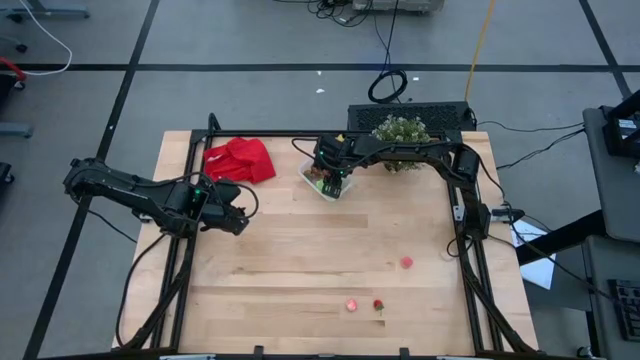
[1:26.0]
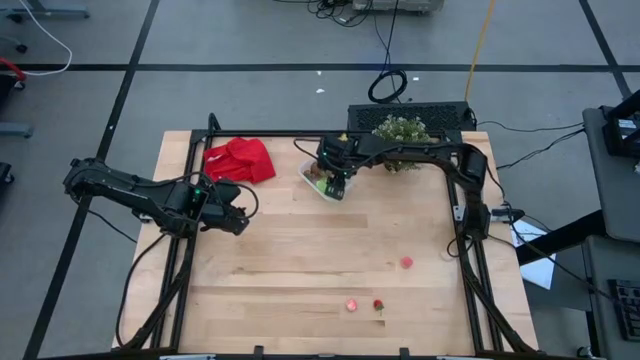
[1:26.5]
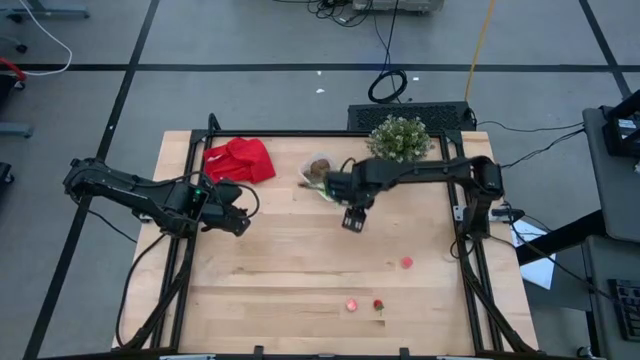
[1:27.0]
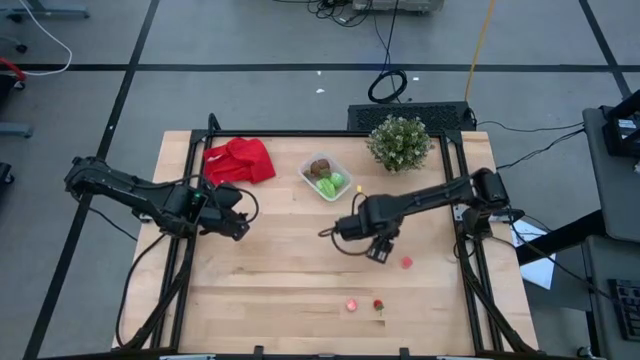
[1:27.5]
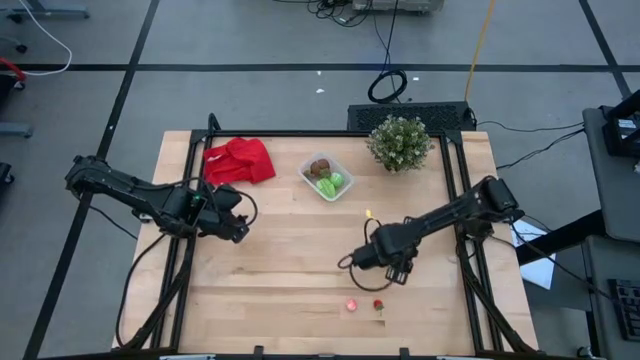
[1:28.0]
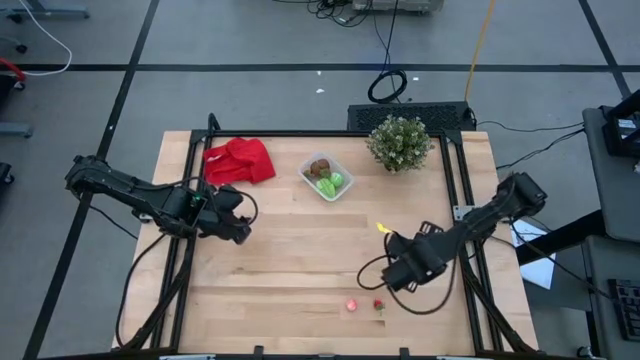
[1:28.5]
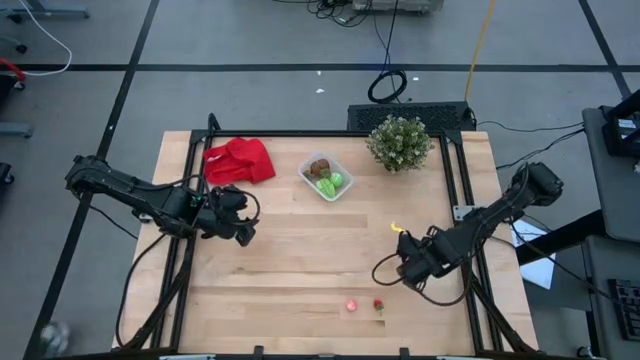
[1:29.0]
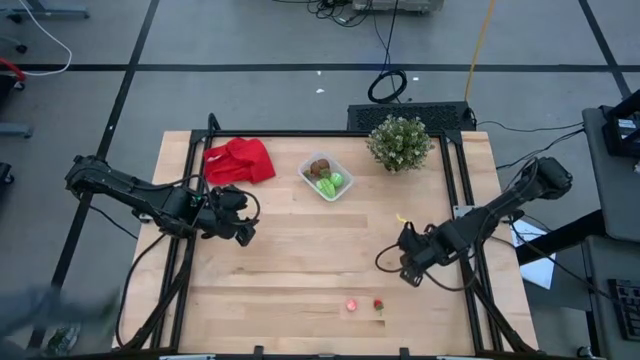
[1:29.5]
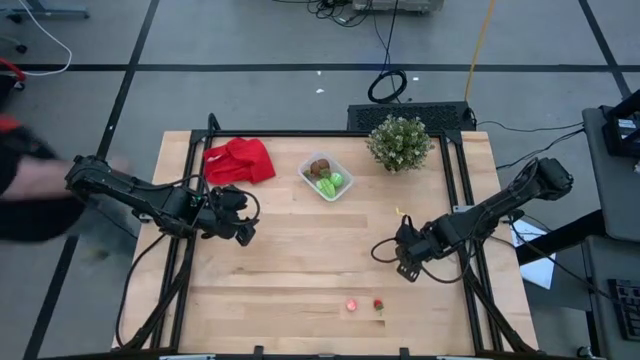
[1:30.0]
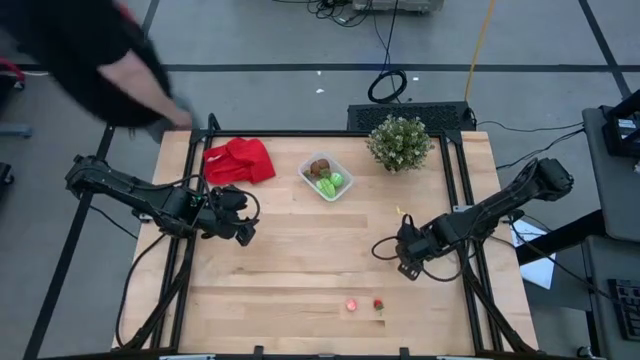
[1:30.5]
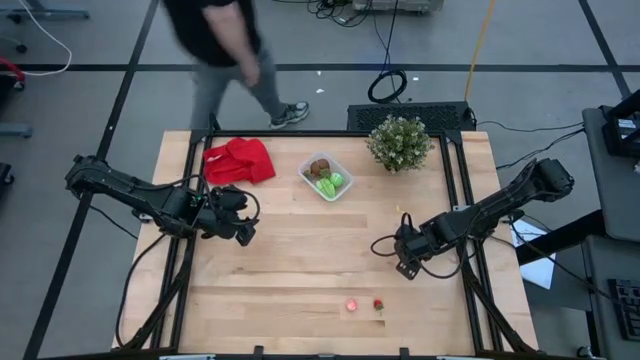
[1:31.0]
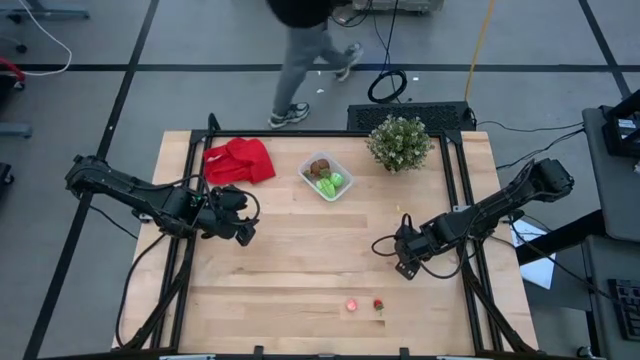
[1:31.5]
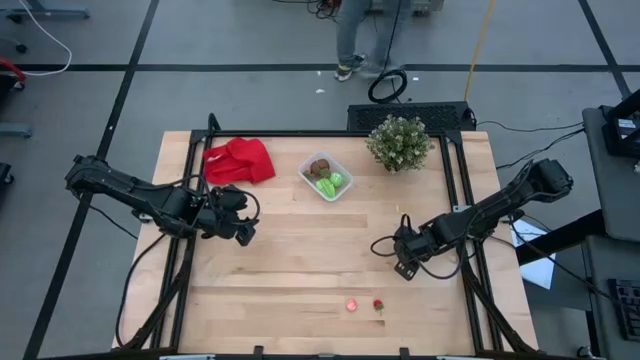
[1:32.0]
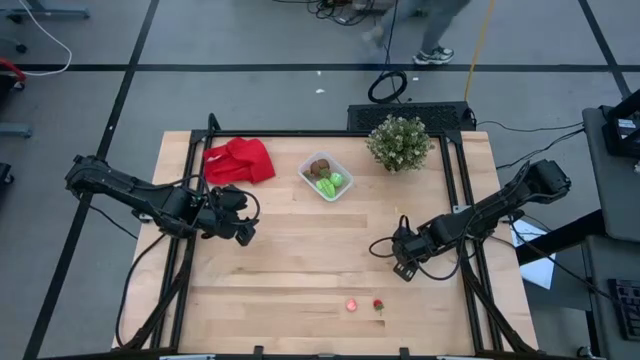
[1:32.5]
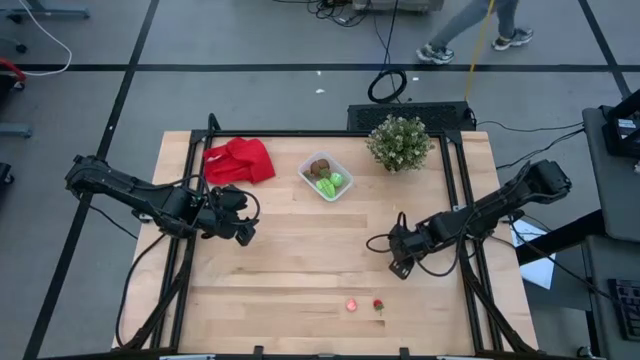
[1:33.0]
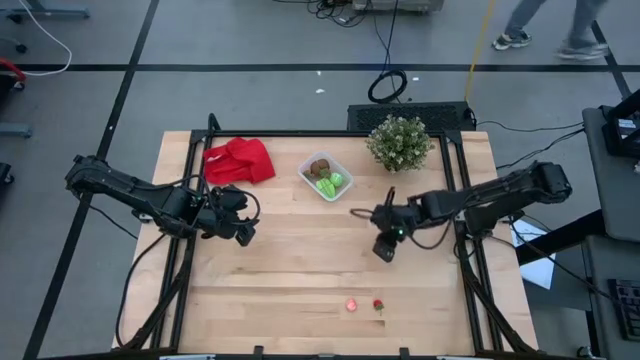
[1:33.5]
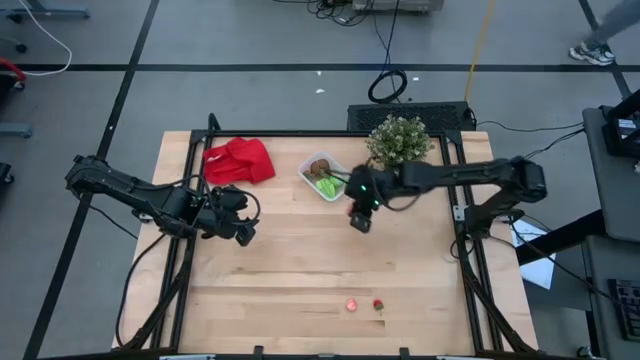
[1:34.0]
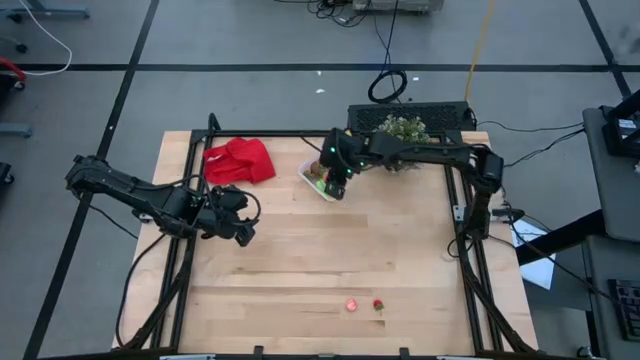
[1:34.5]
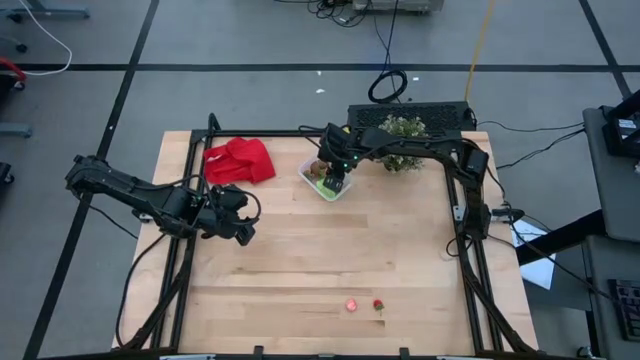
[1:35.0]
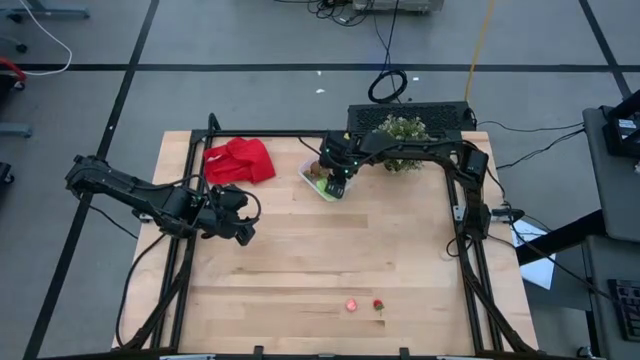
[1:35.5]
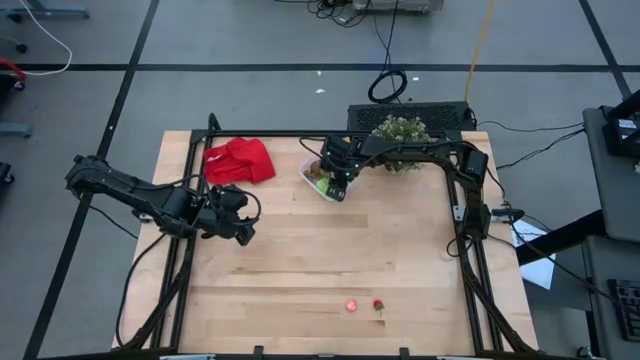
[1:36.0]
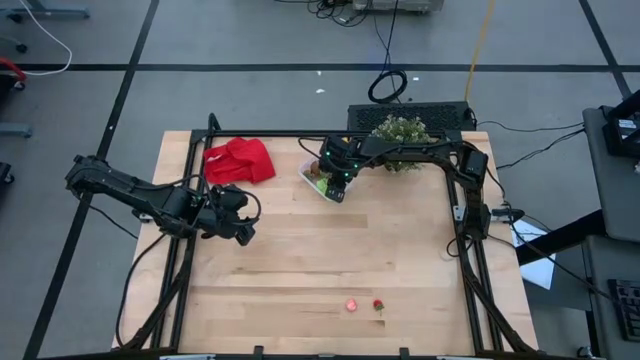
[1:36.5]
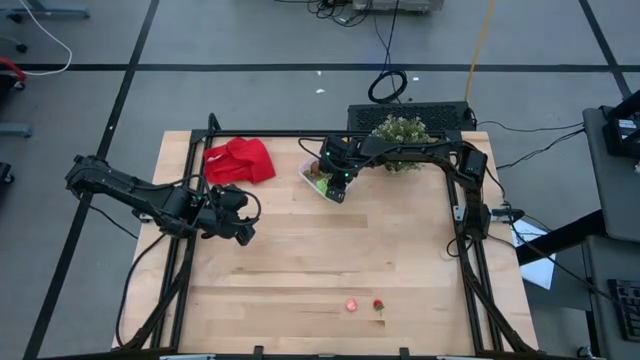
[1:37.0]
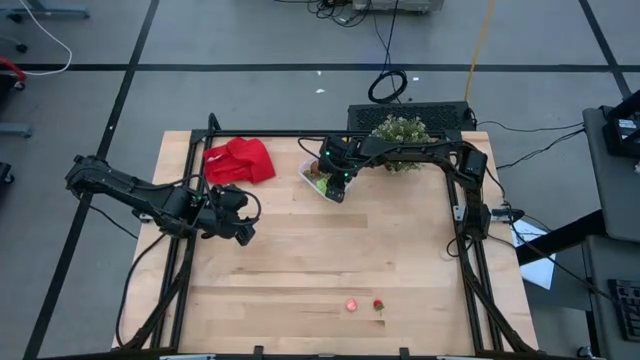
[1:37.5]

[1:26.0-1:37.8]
Task: Pick and placing Produce into tupperware
Put the top pink peach into the transparent bin

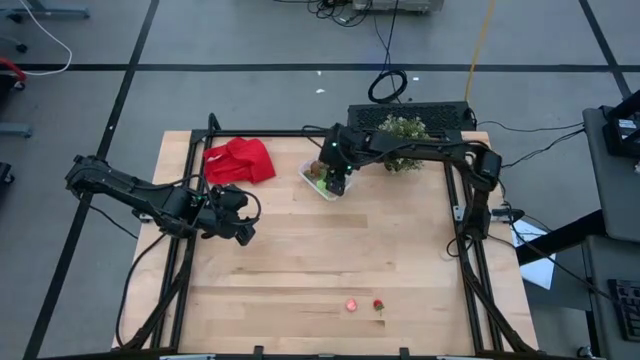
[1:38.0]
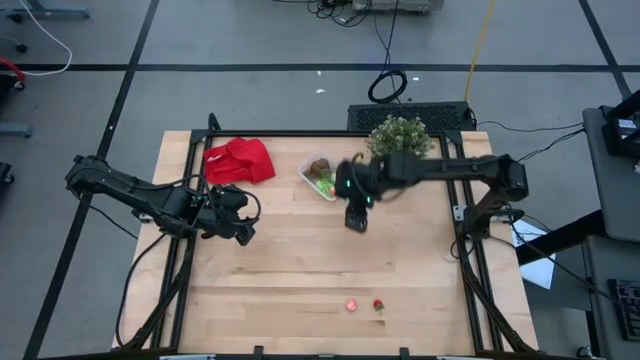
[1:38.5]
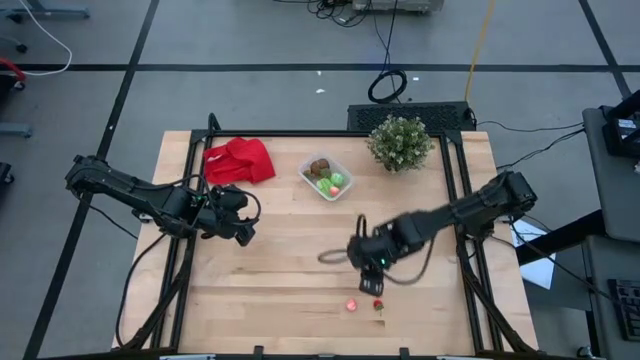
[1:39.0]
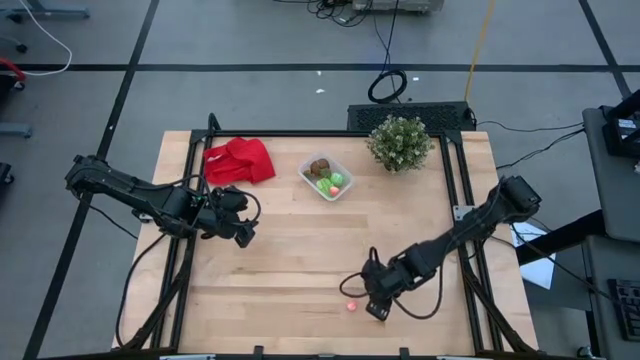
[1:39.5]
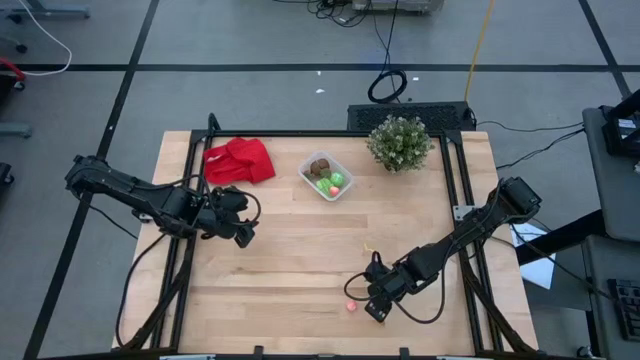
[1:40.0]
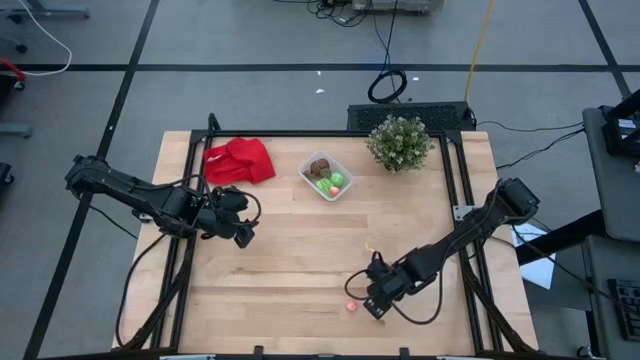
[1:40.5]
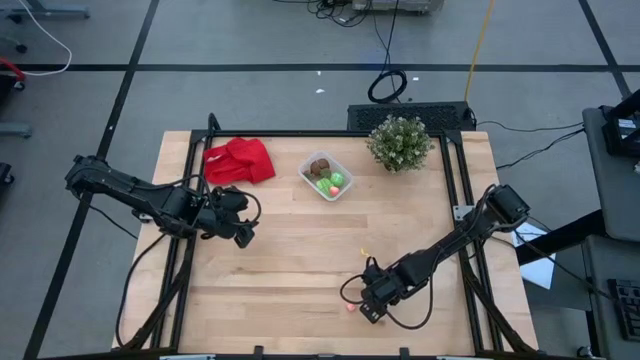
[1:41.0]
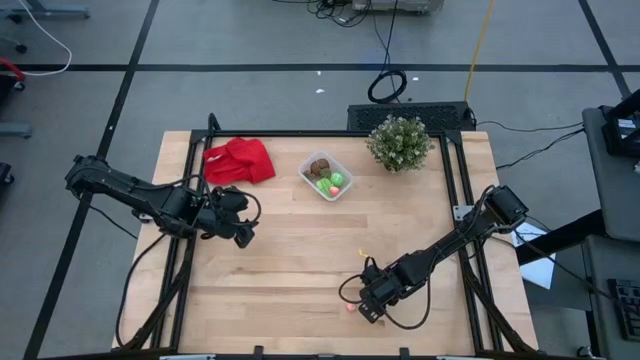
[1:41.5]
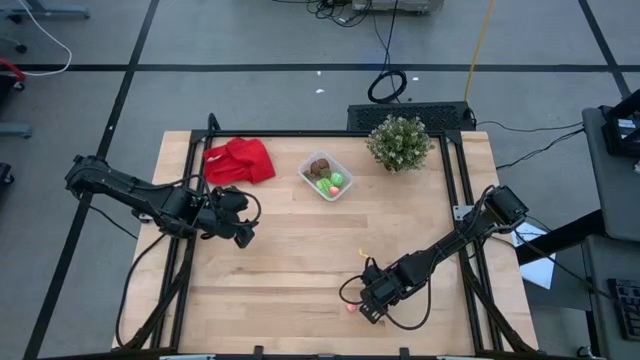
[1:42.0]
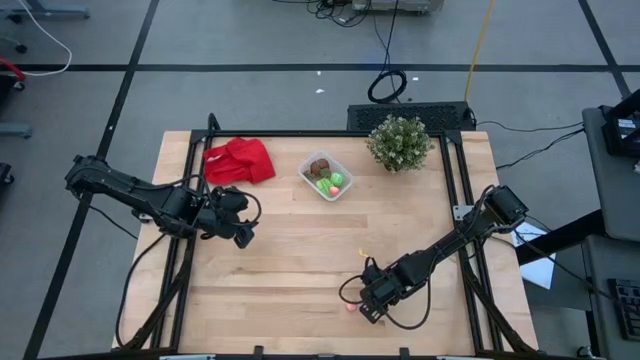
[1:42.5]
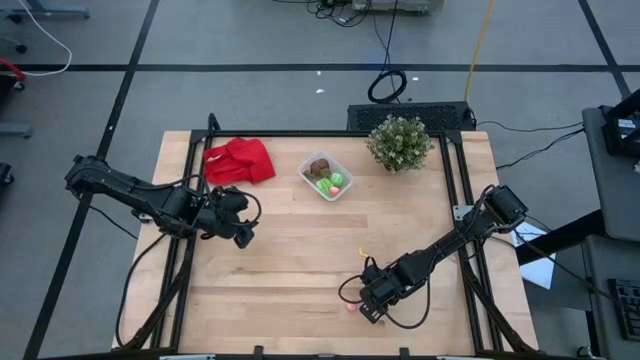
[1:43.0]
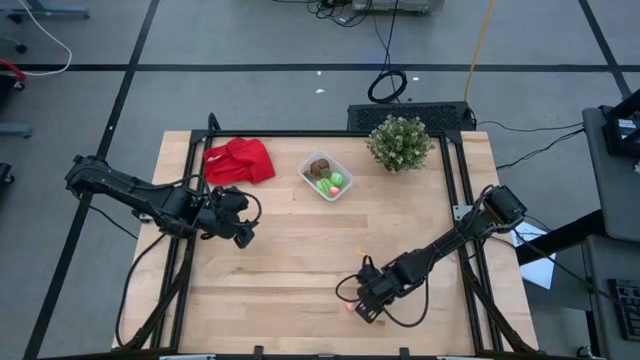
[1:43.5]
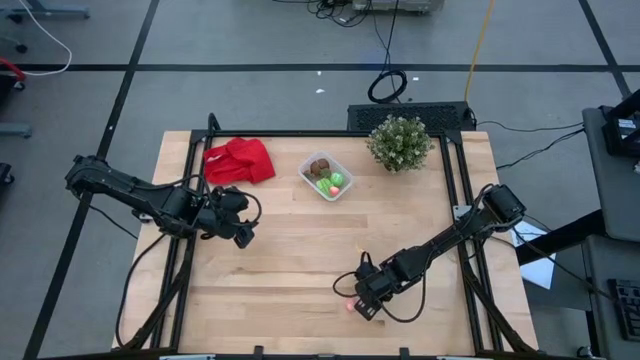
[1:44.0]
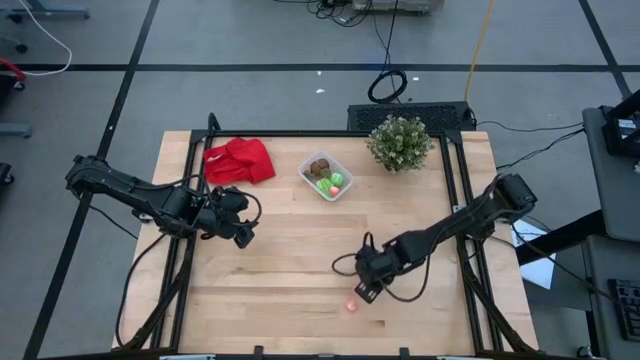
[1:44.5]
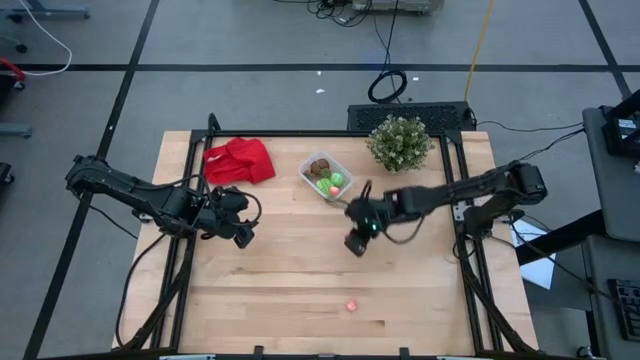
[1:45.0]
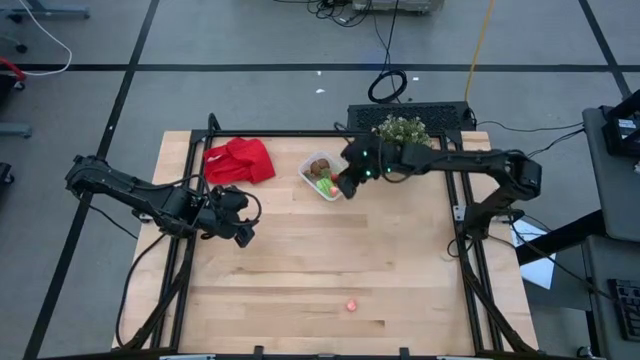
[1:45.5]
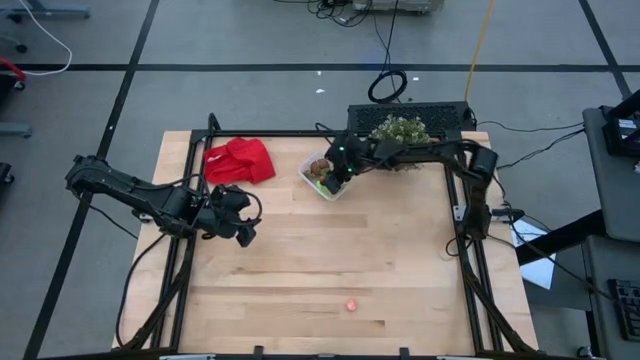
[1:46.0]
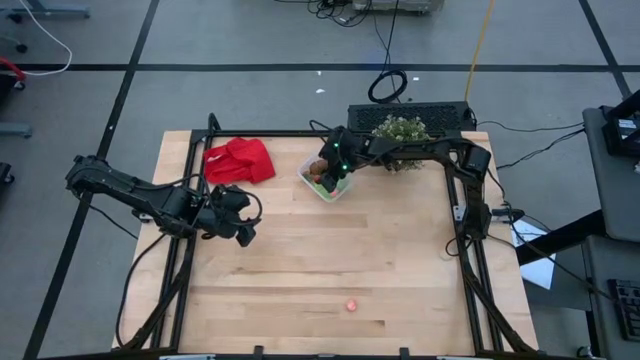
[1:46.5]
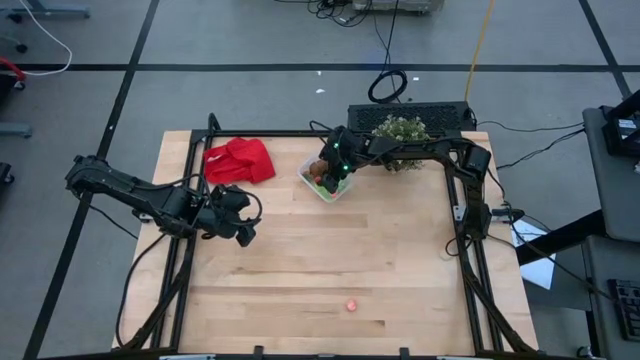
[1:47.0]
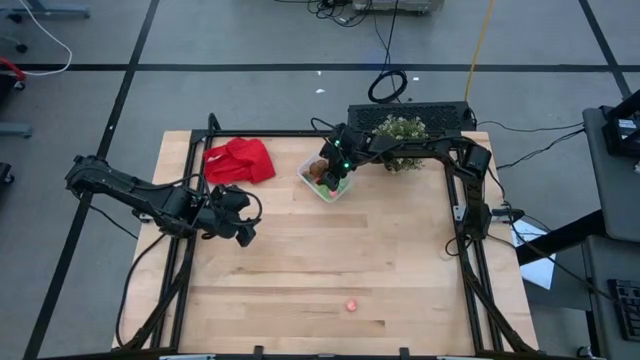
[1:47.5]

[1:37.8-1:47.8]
Put the red strawberry into the transparent bin
